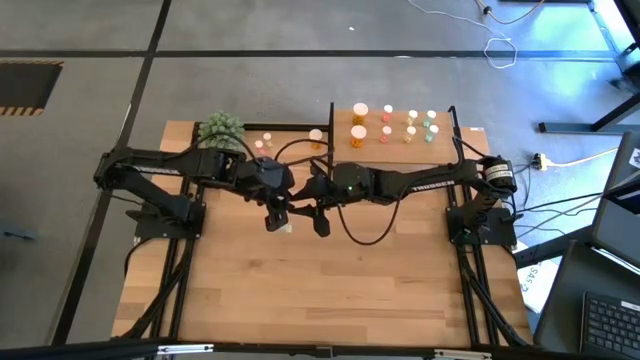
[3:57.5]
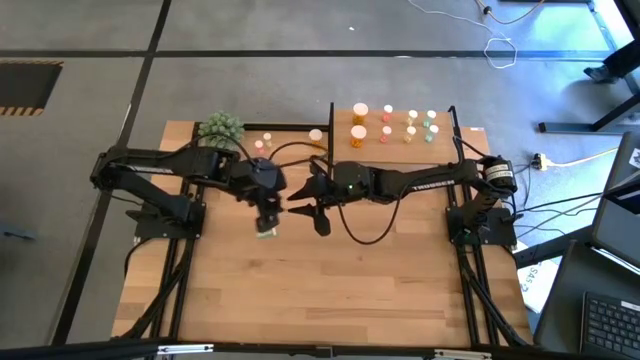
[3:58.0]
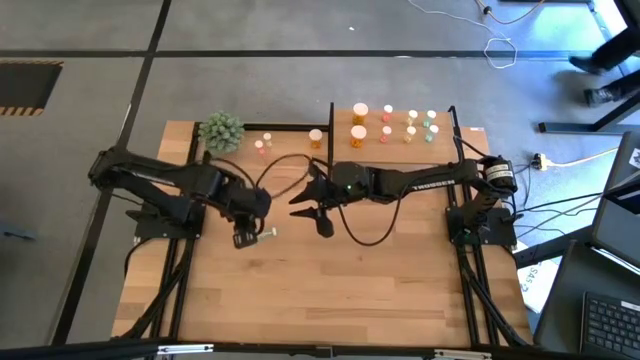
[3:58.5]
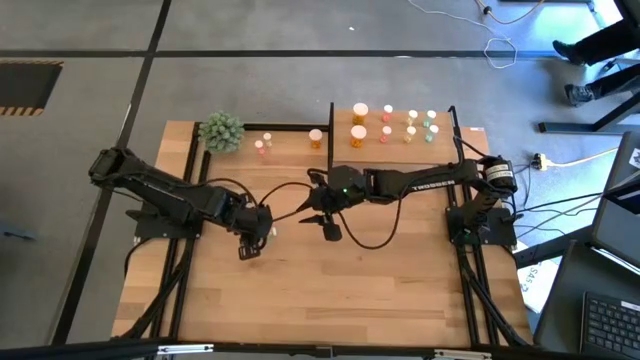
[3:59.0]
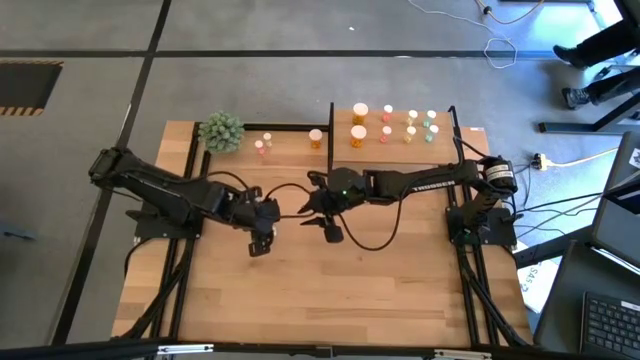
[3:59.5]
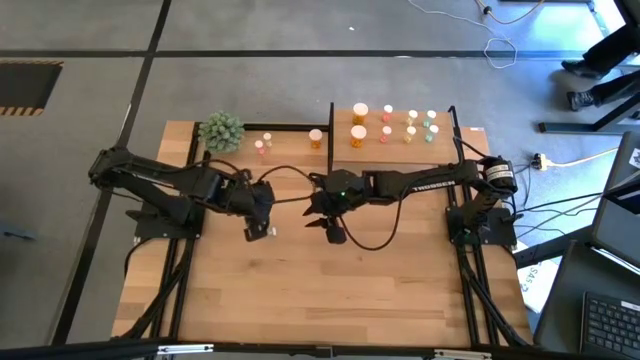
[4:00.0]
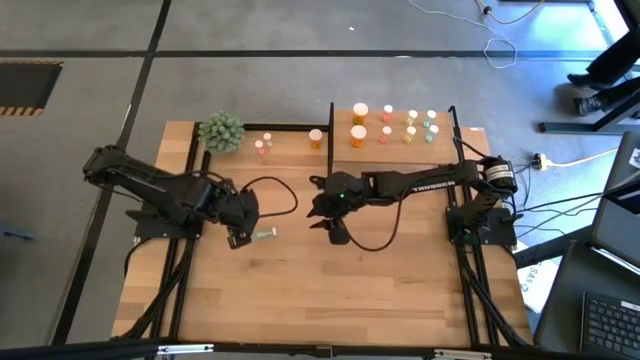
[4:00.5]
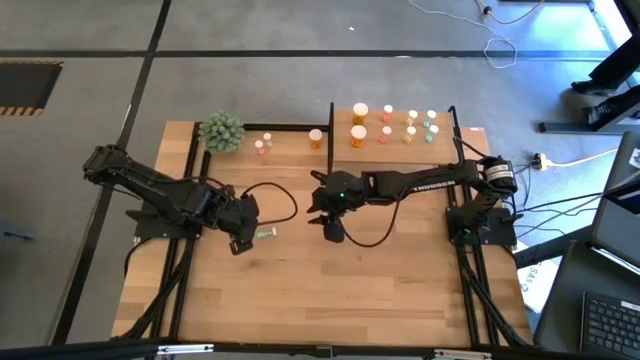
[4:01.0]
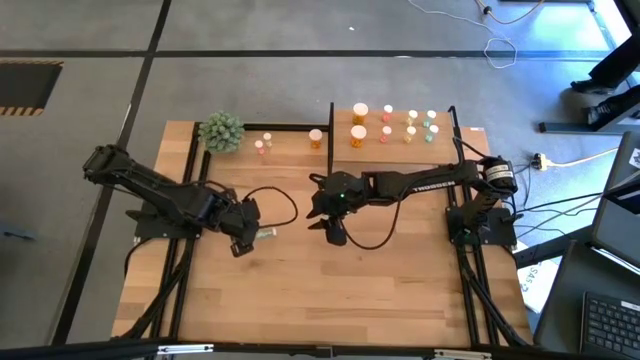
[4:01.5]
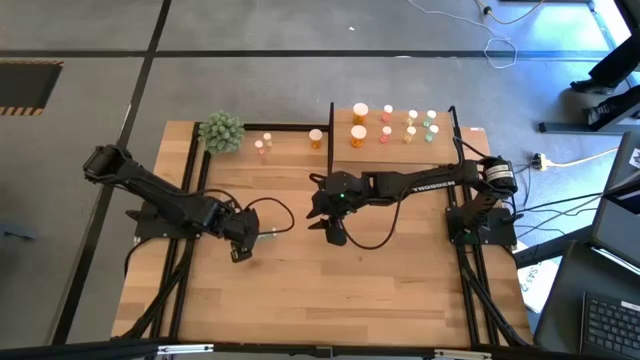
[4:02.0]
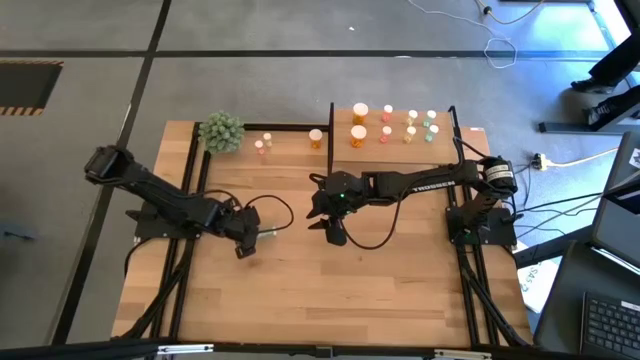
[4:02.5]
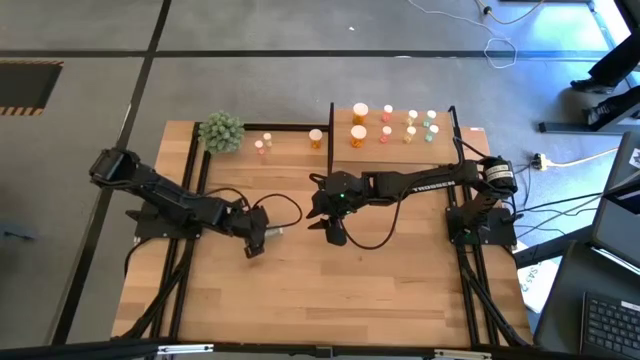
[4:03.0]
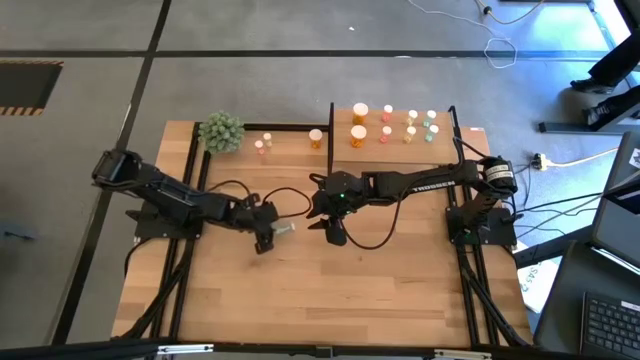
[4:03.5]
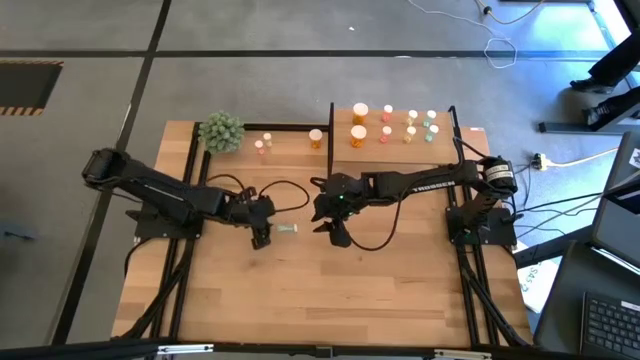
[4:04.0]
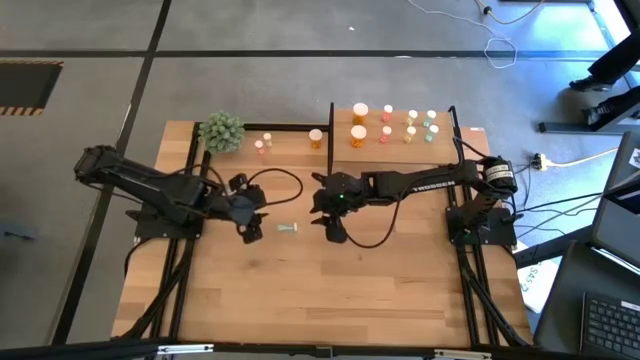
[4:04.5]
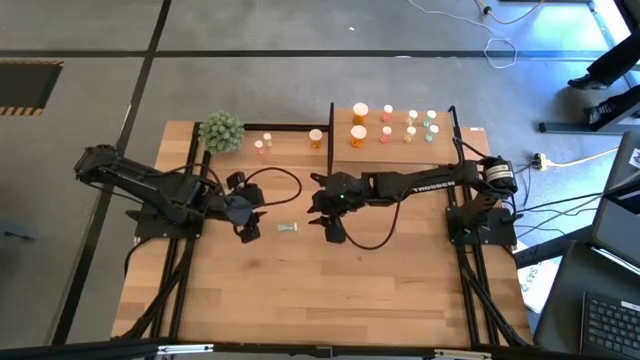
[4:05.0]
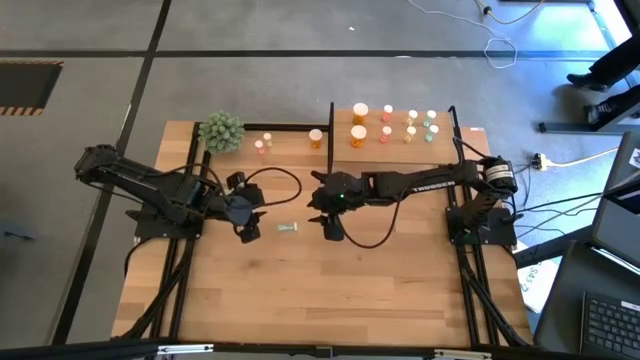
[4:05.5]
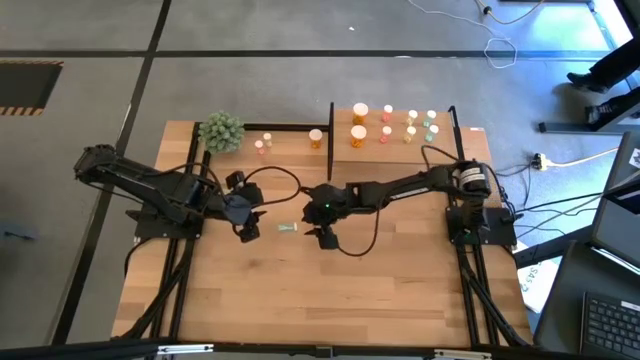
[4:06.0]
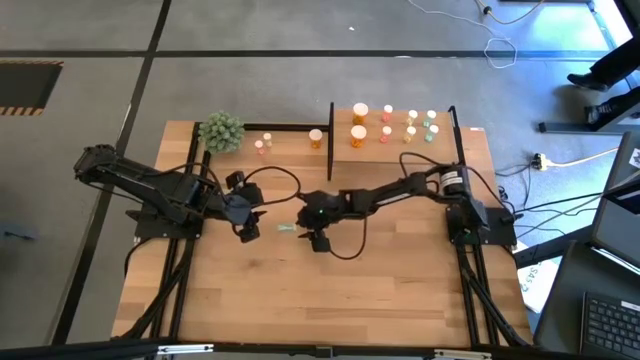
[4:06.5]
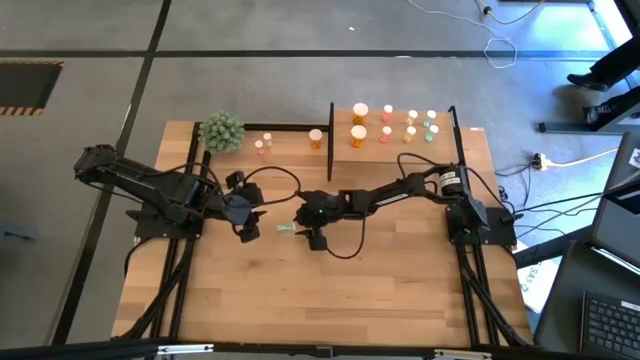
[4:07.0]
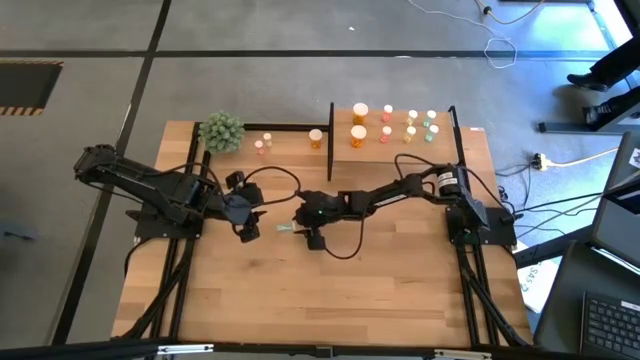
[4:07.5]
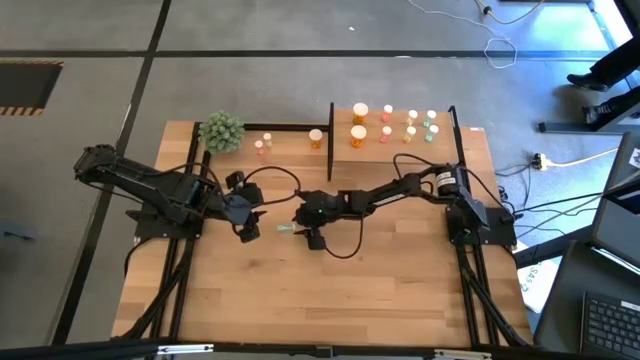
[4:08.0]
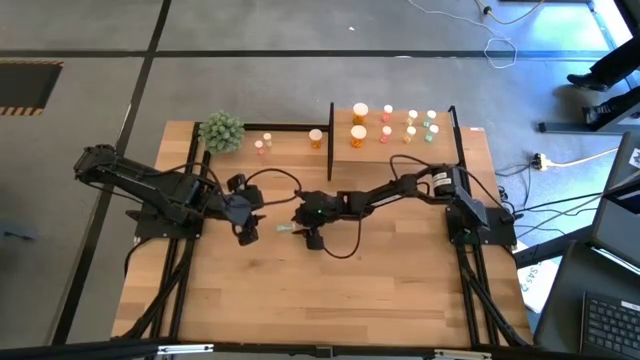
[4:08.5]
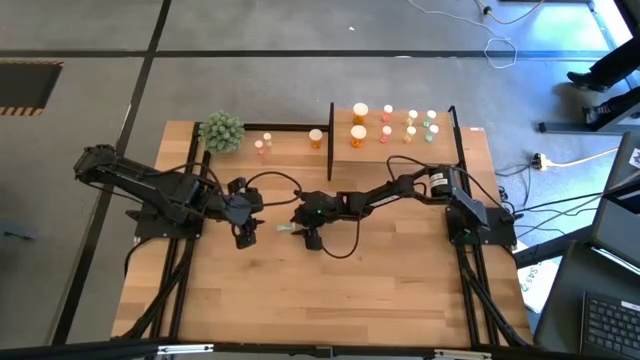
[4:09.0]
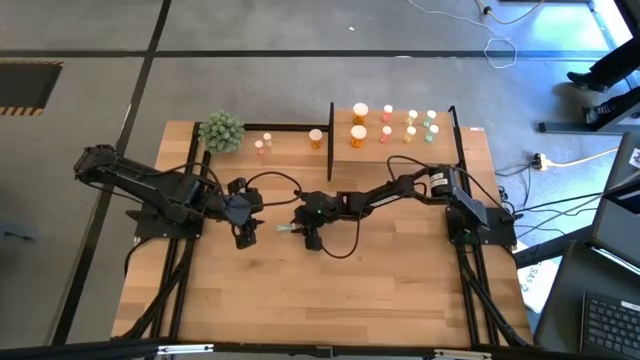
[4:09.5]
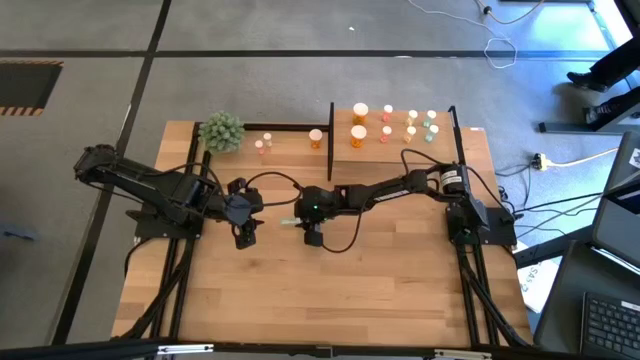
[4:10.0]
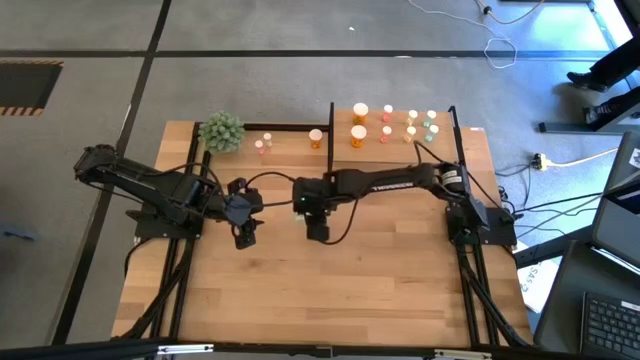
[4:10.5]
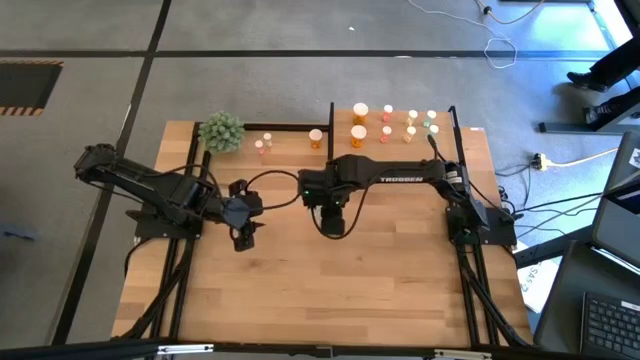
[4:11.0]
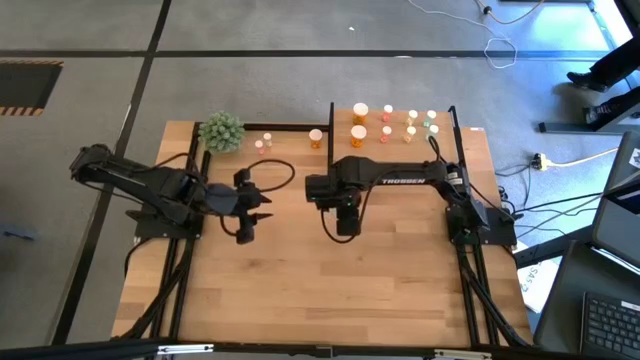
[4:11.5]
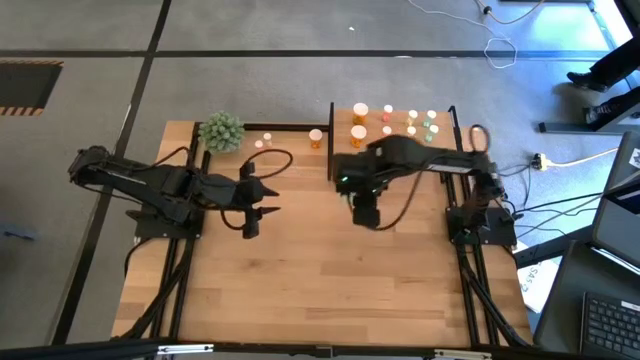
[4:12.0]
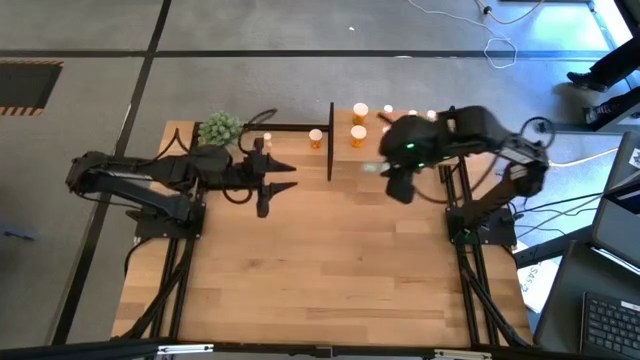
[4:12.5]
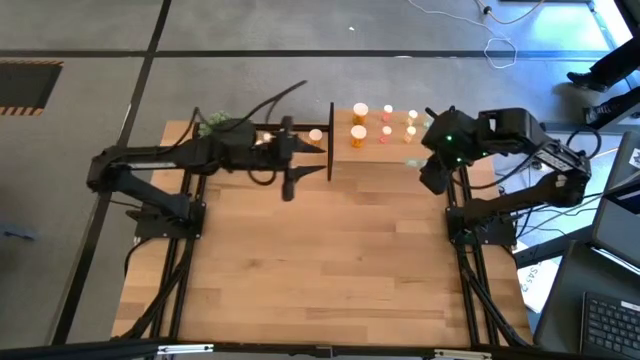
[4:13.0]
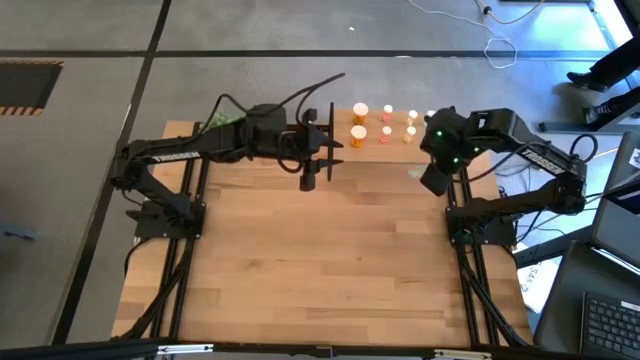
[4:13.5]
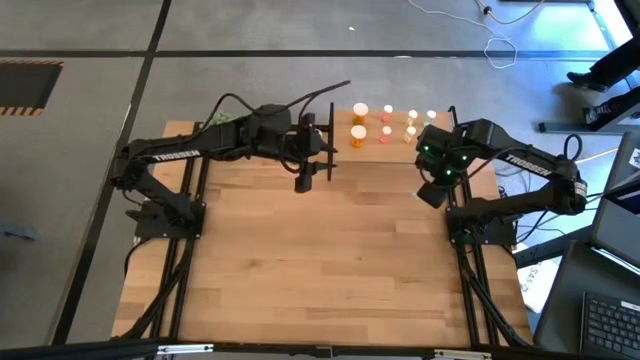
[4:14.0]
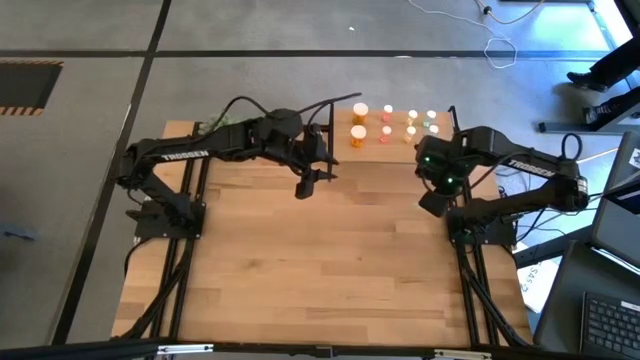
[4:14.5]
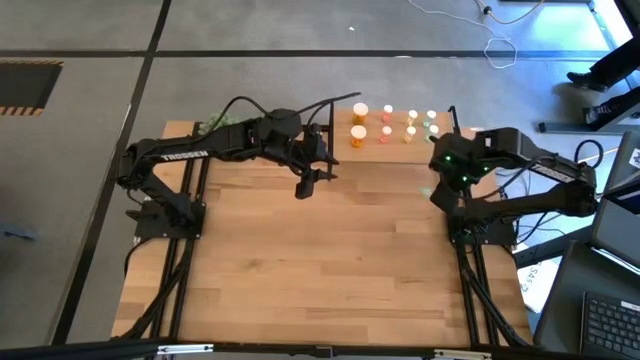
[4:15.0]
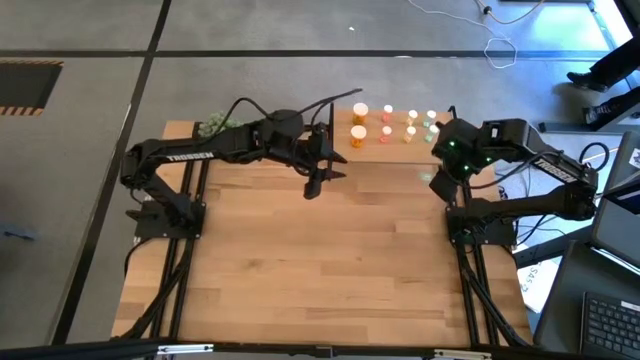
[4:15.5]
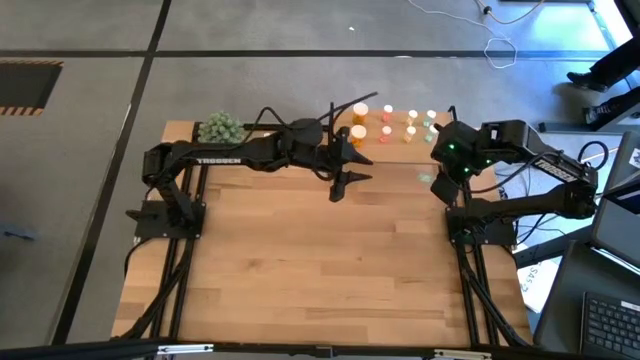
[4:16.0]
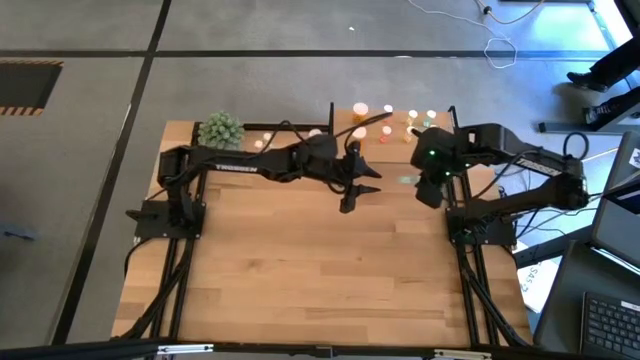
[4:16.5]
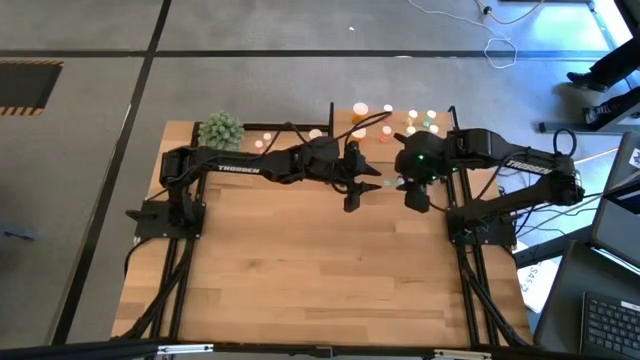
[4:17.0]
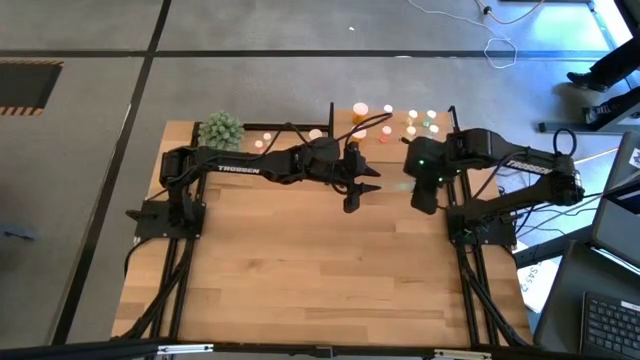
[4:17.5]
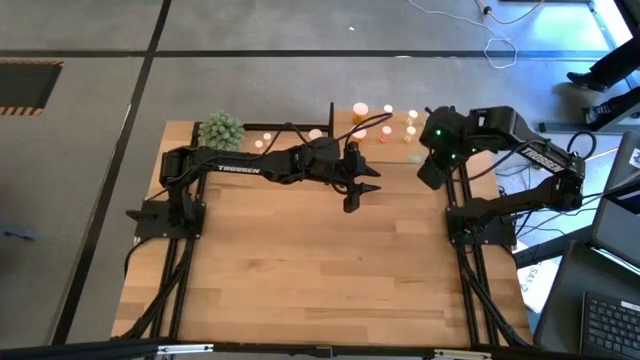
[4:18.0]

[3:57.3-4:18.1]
Task: Pick and place medicine bottles onto shelf by color
Put the blue pill bottle on the shelf aligned with the other blue pill bottles
